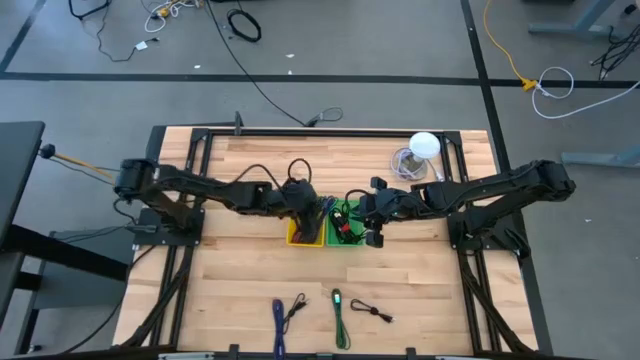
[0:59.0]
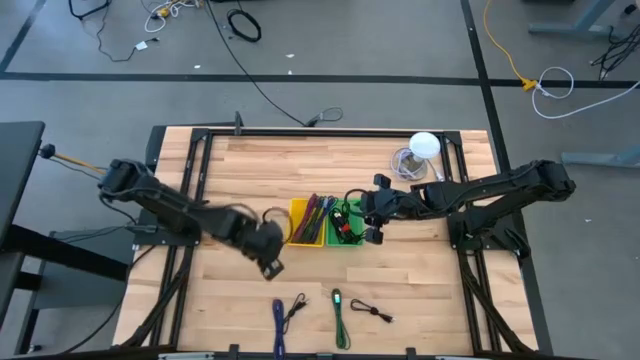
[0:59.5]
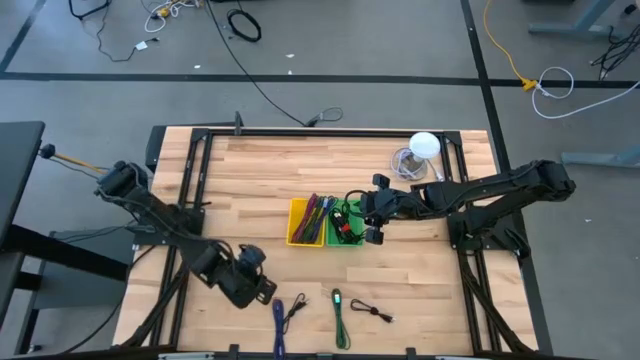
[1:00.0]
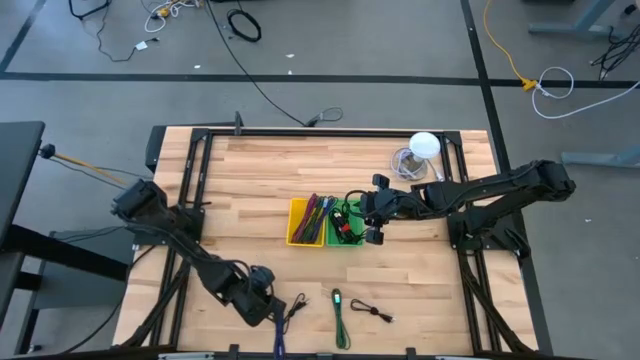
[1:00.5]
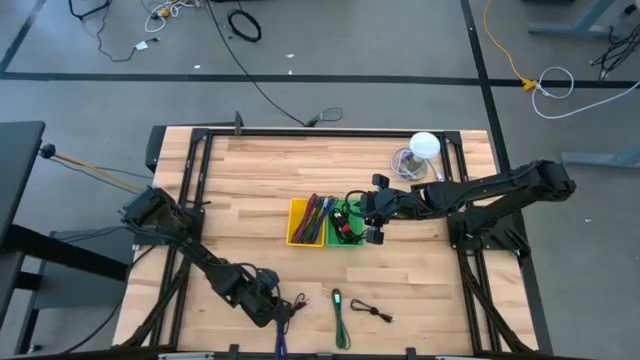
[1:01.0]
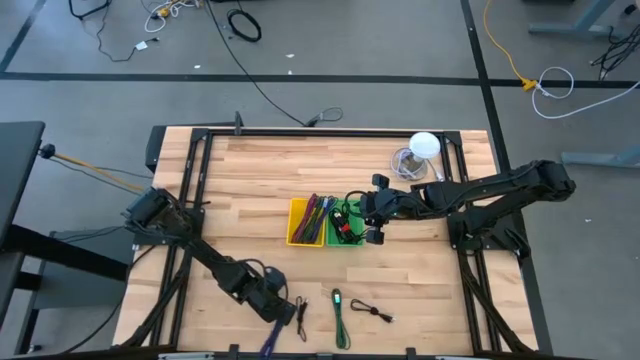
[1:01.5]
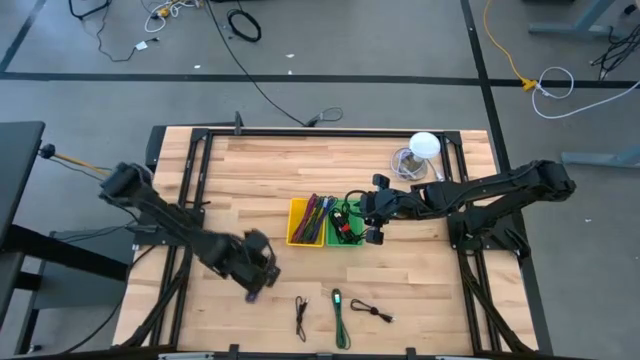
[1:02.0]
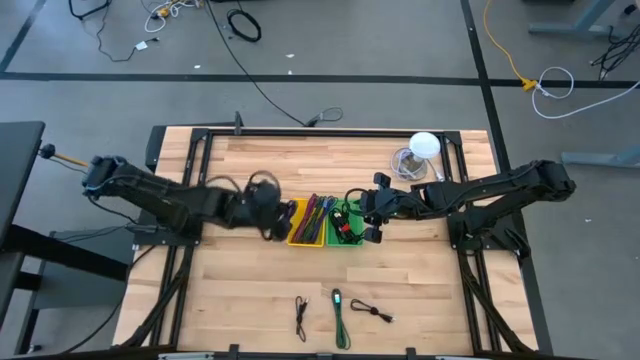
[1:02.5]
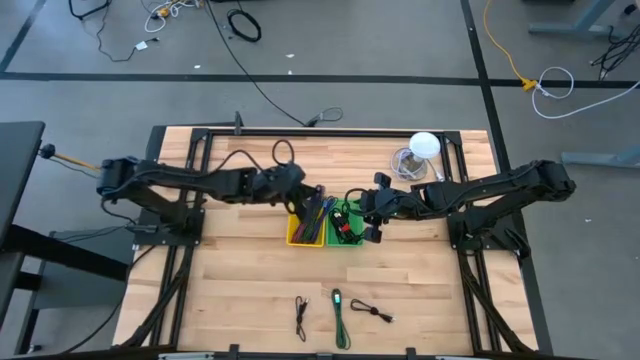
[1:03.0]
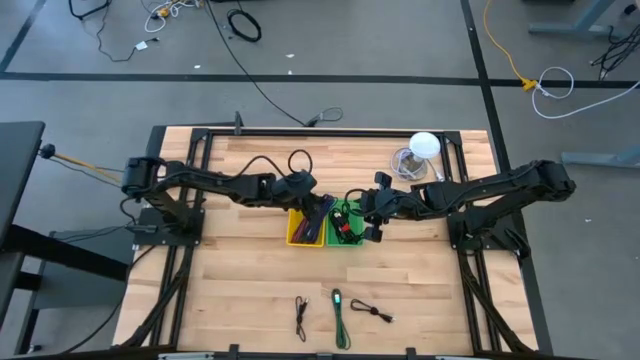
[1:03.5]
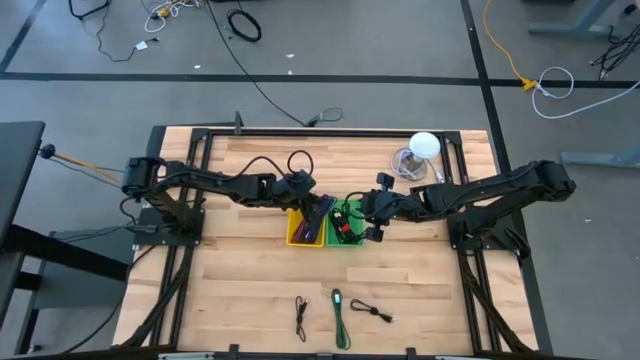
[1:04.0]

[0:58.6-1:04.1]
Task: Pick & Place USB Port
Put the violet charger cable into the yellow basket

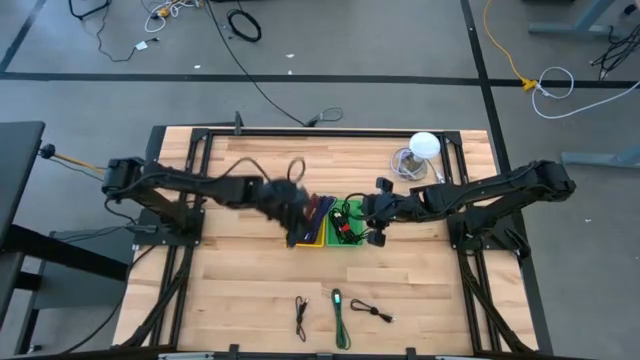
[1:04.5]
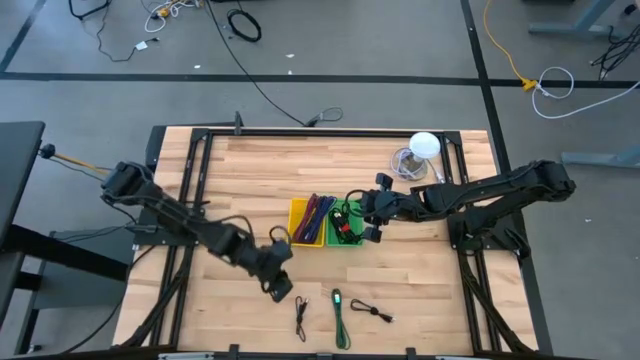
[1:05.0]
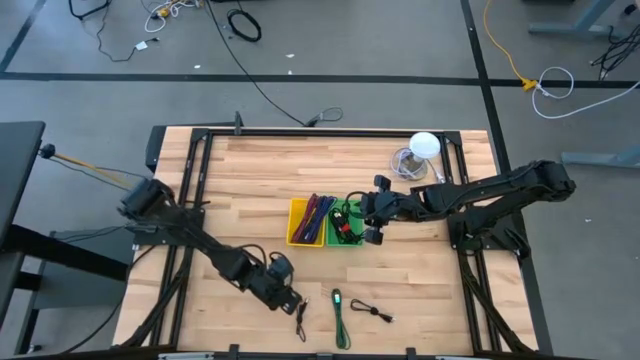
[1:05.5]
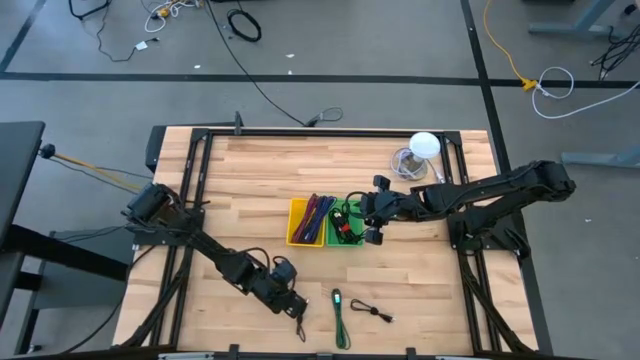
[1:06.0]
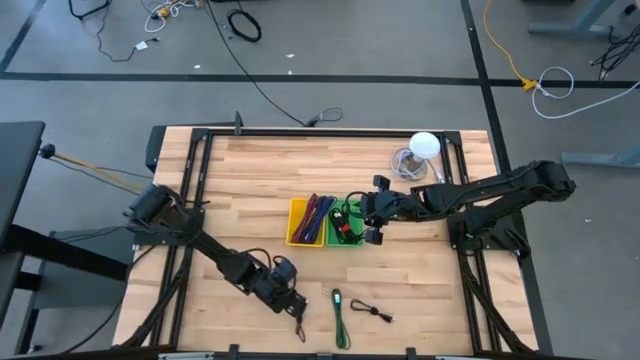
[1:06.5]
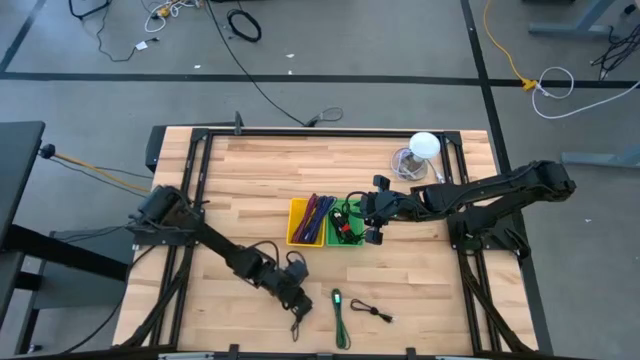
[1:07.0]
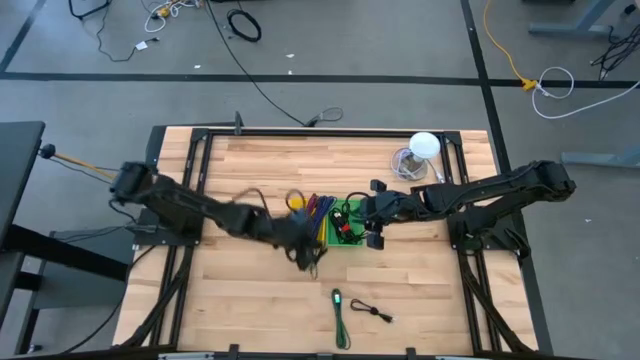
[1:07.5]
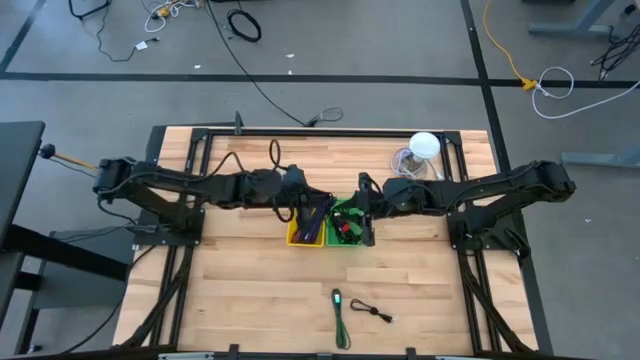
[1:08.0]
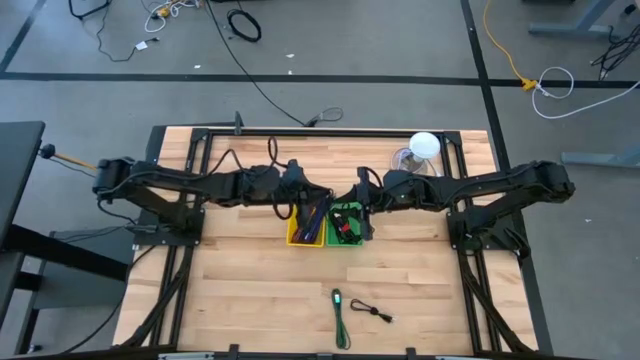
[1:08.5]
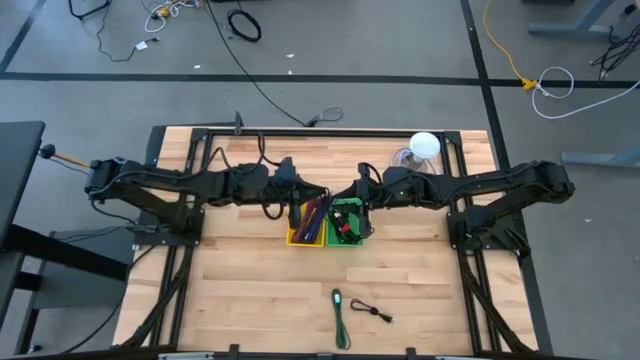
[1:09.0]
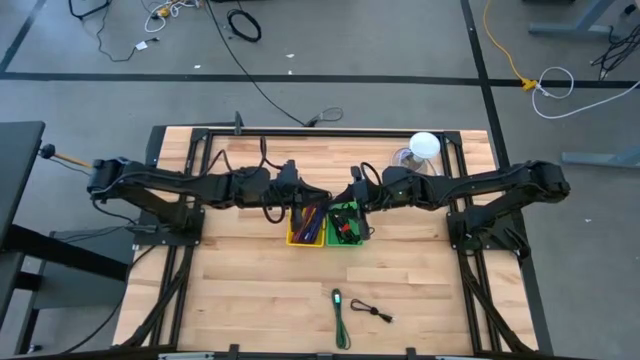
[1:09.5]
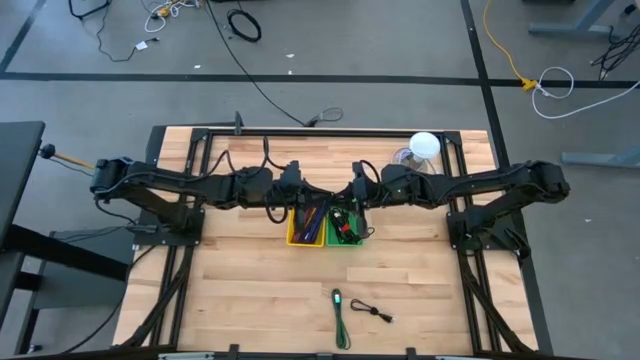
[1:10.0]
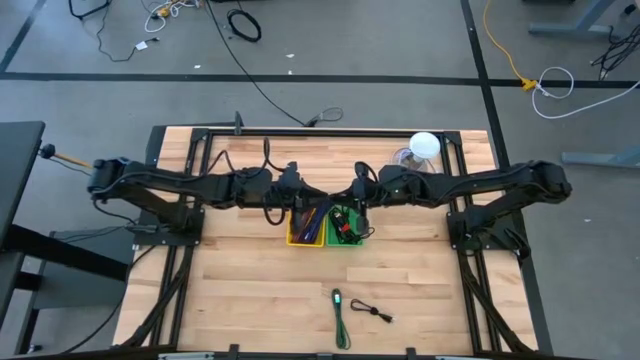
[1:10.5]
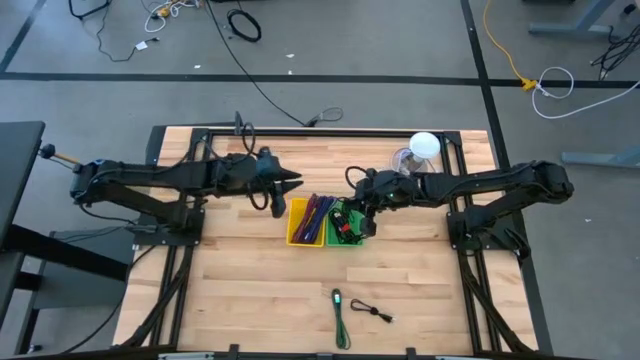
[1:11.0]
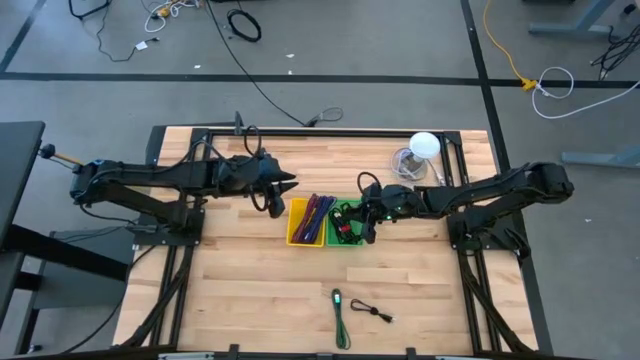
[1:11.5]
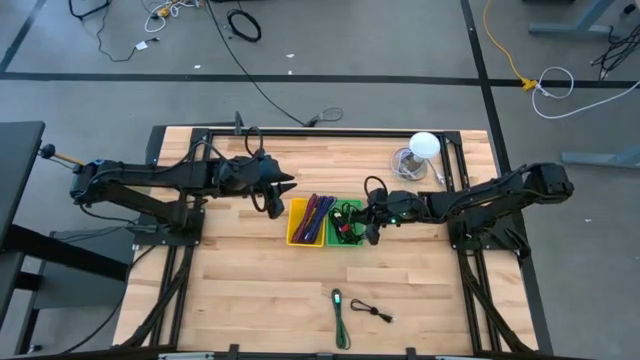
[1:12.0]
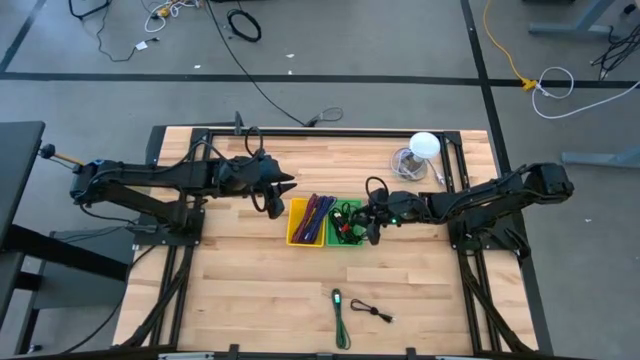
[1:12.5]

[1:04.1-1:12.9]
Put the black charger cable into the green basket

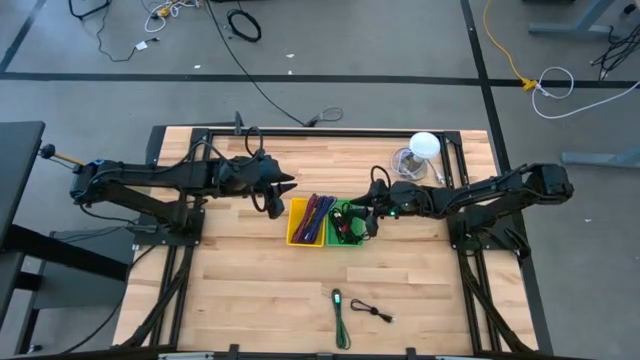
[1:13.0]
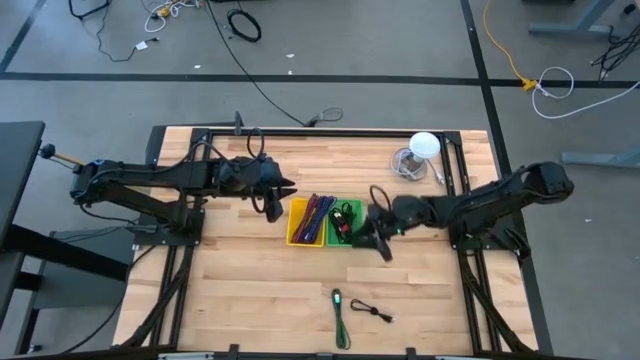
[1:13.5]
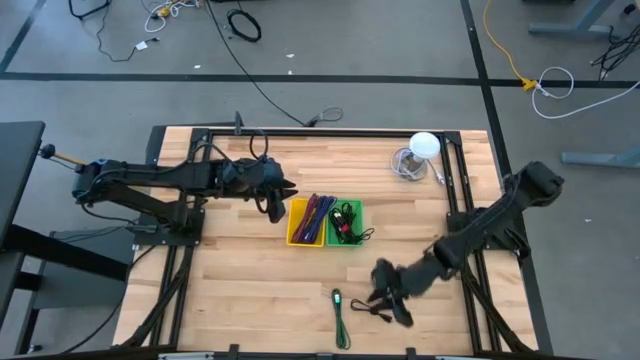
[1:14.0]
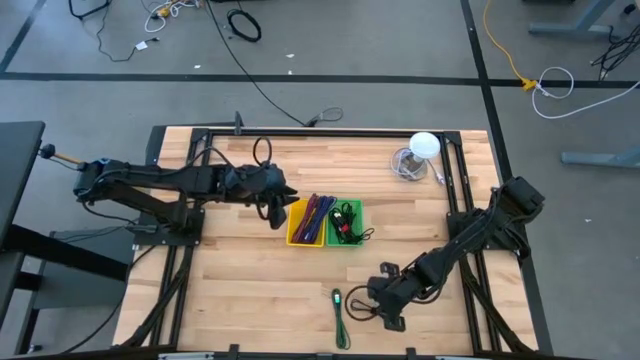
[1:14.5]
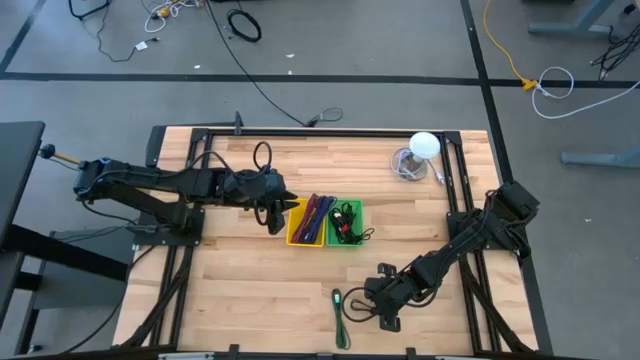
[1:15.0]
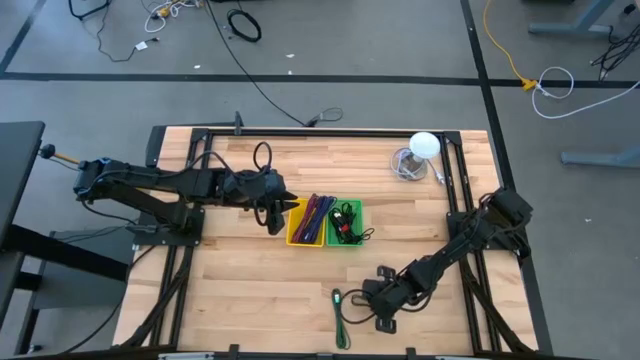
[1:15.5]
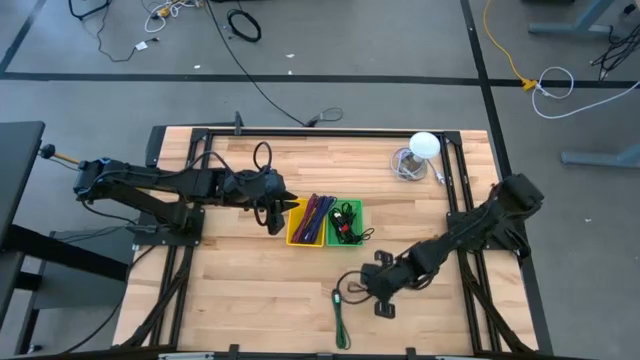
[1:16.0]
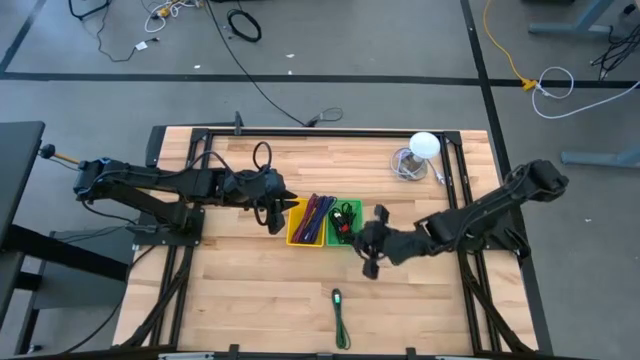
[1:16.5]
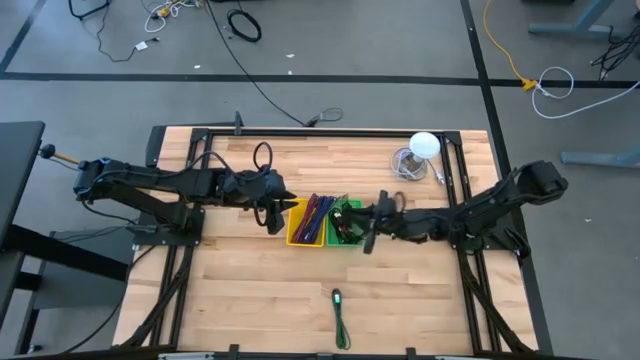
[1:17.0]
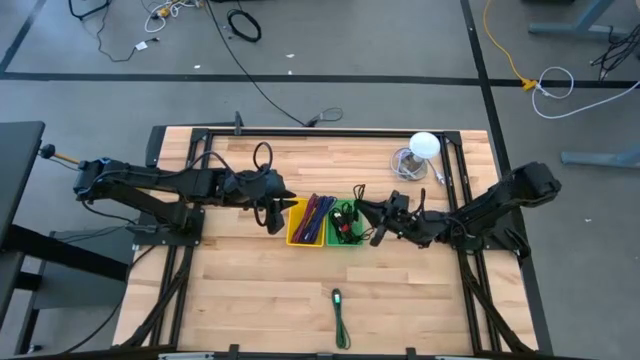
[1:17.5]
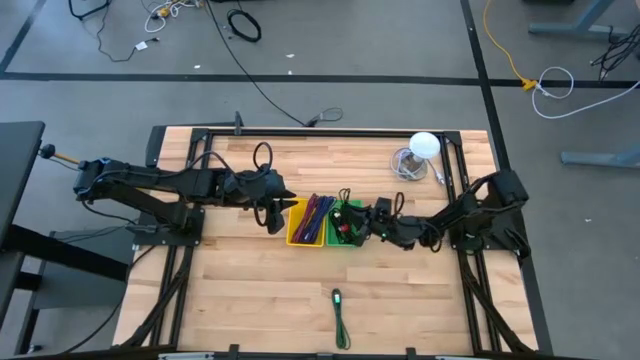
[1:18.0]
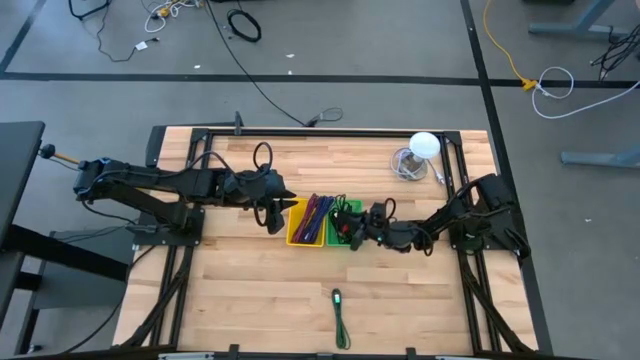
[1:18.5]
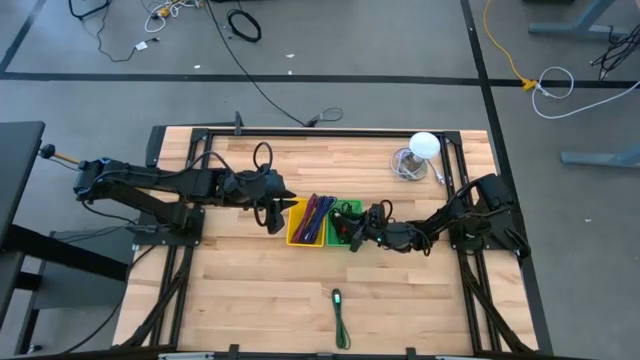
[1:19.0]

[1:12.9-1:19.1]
Put the black charger cable into the green basket
